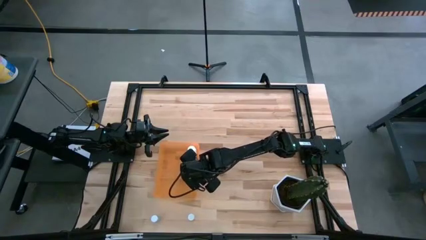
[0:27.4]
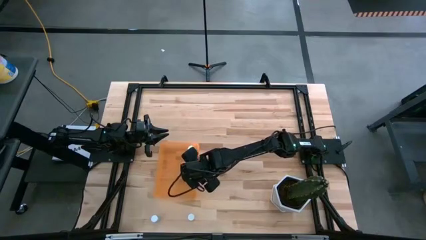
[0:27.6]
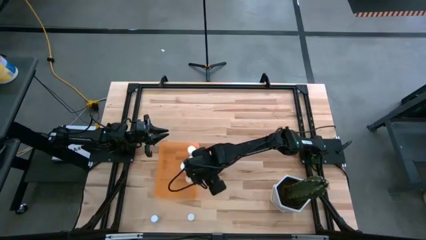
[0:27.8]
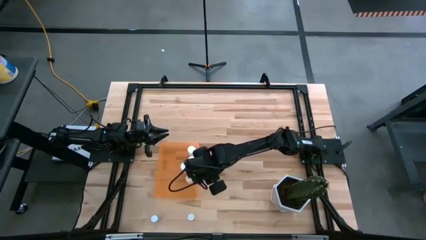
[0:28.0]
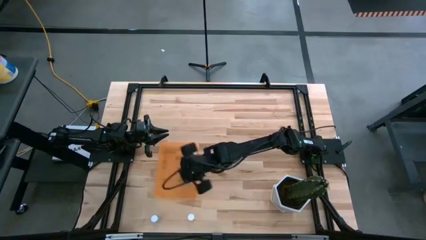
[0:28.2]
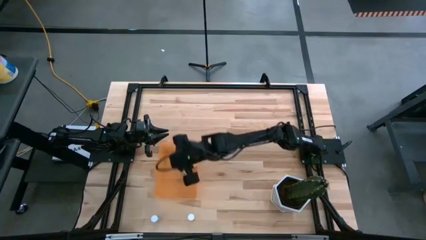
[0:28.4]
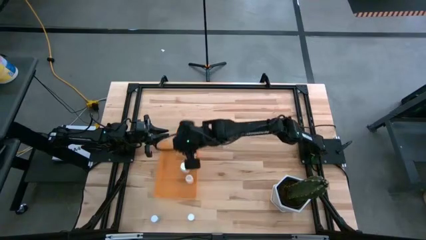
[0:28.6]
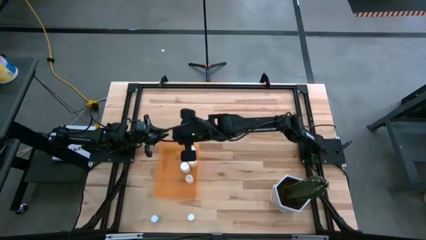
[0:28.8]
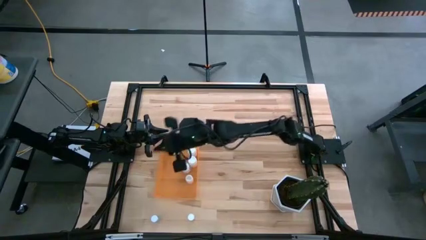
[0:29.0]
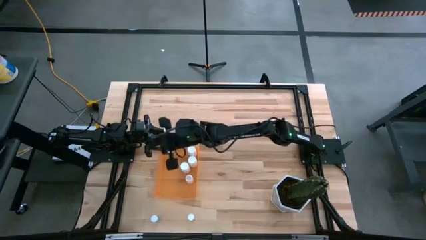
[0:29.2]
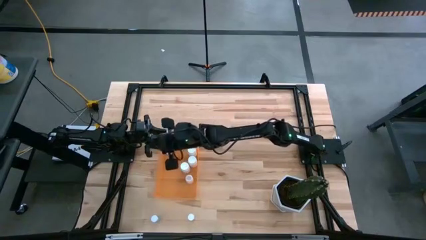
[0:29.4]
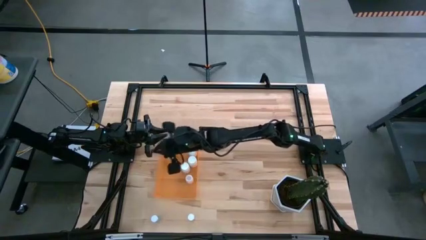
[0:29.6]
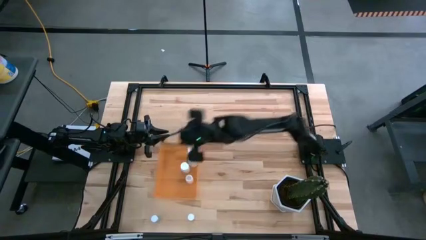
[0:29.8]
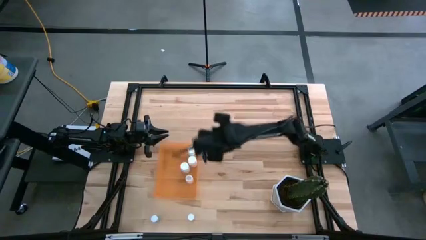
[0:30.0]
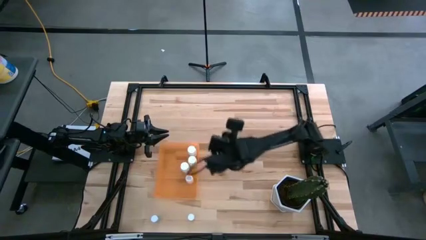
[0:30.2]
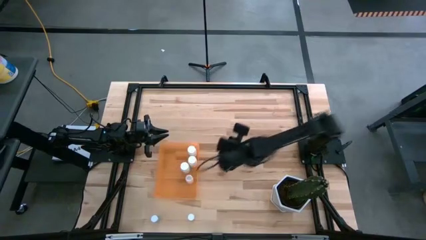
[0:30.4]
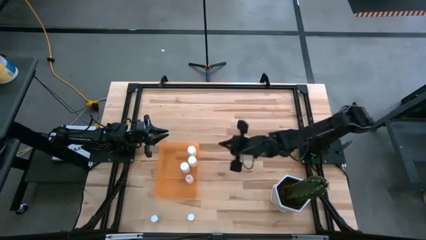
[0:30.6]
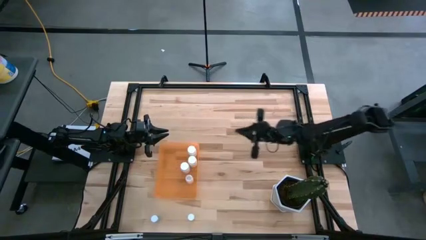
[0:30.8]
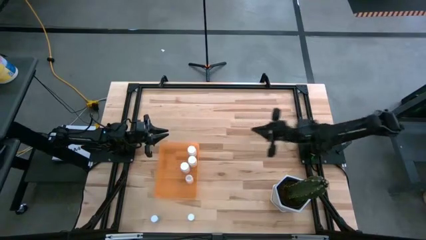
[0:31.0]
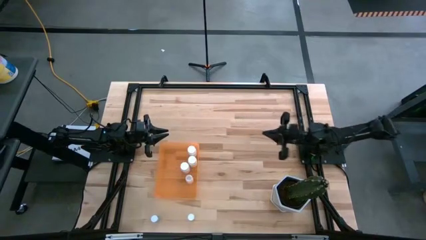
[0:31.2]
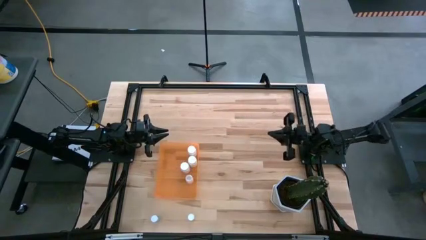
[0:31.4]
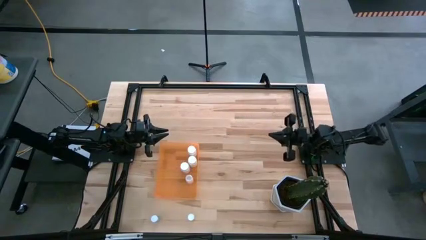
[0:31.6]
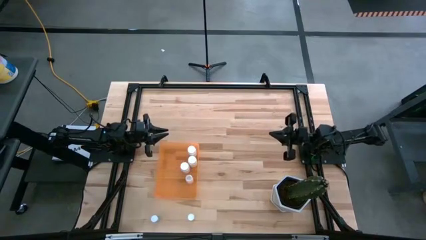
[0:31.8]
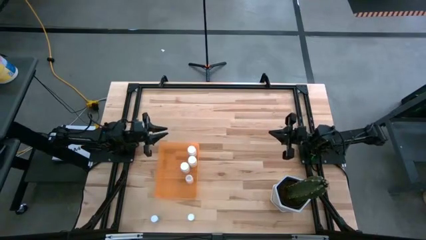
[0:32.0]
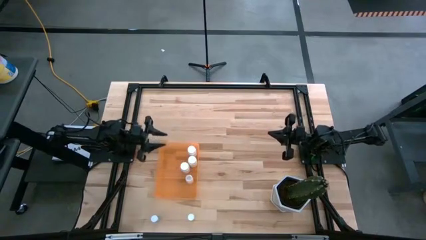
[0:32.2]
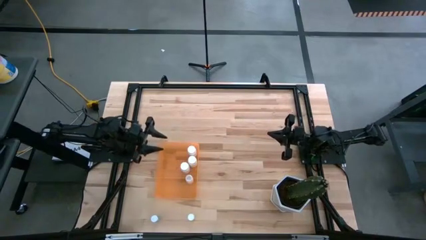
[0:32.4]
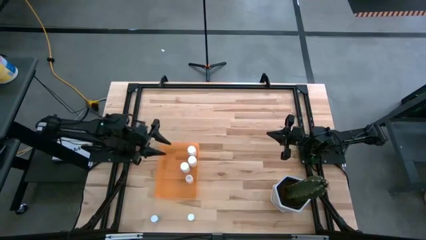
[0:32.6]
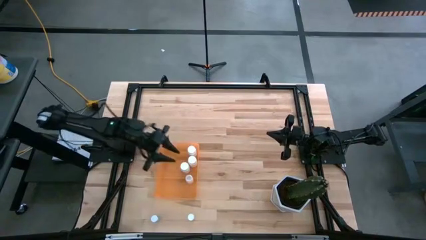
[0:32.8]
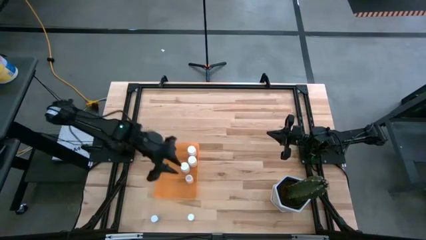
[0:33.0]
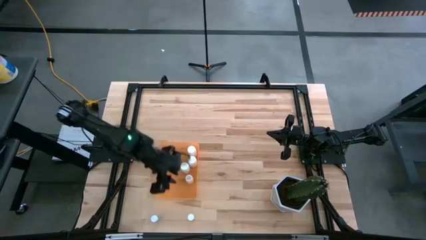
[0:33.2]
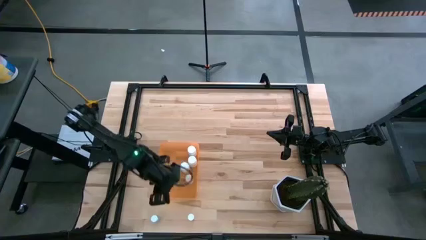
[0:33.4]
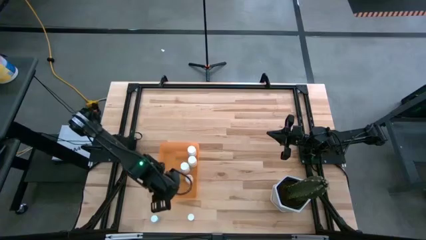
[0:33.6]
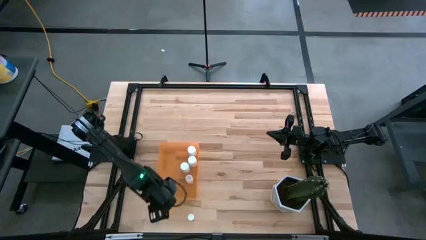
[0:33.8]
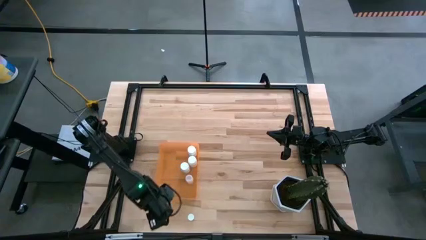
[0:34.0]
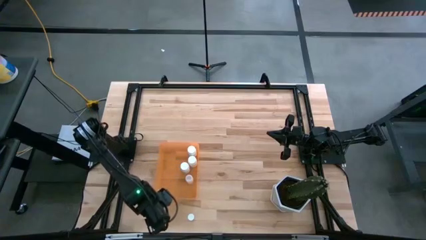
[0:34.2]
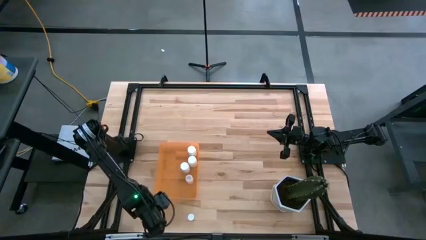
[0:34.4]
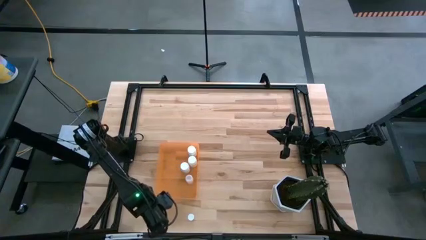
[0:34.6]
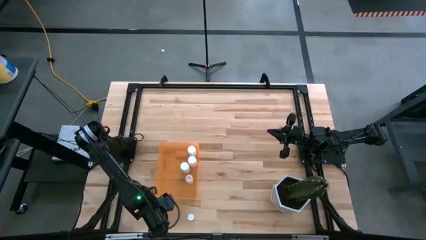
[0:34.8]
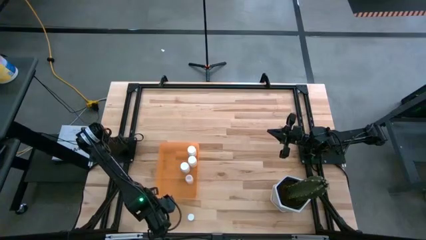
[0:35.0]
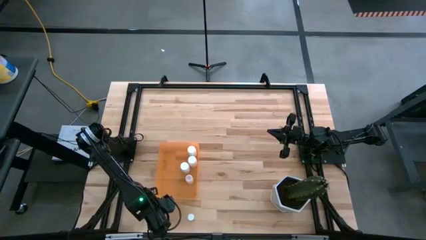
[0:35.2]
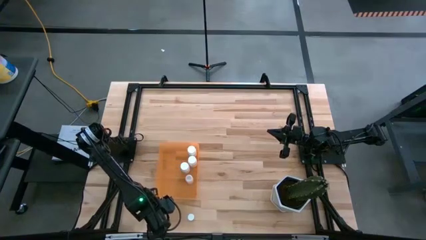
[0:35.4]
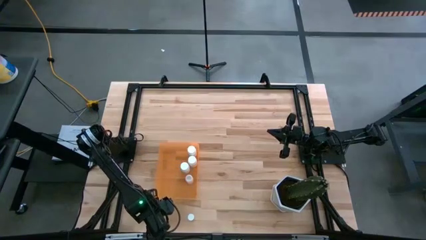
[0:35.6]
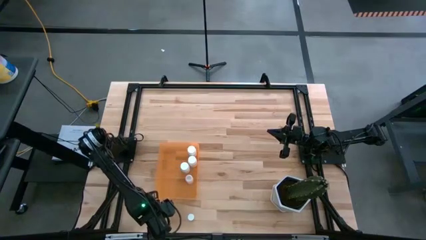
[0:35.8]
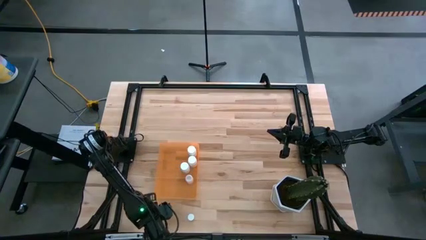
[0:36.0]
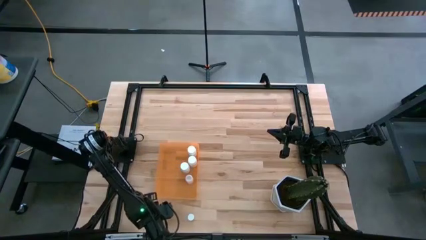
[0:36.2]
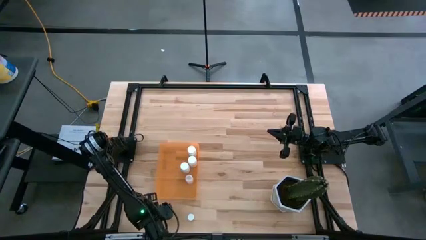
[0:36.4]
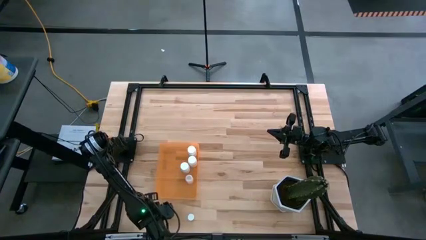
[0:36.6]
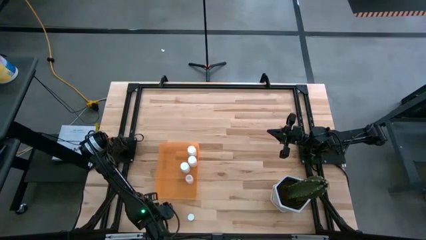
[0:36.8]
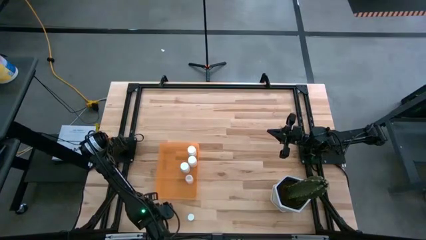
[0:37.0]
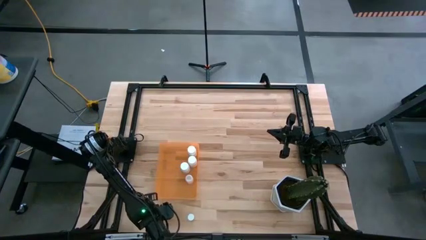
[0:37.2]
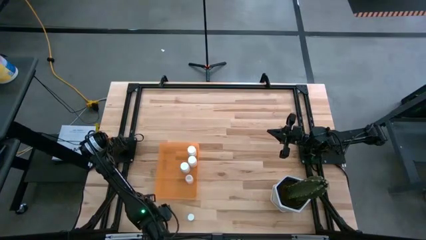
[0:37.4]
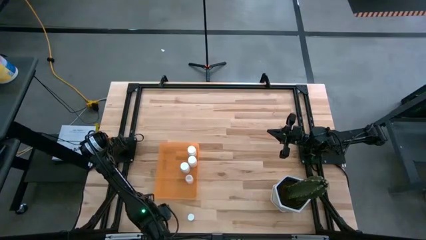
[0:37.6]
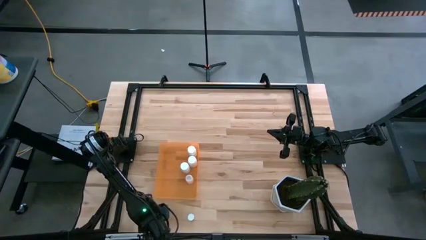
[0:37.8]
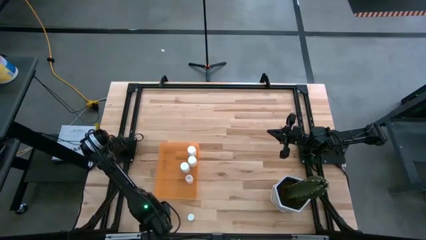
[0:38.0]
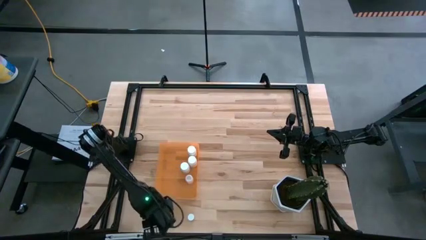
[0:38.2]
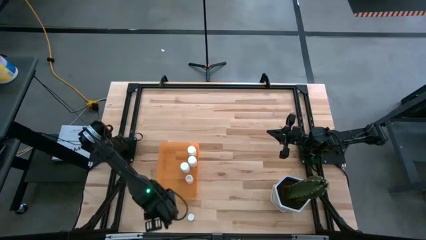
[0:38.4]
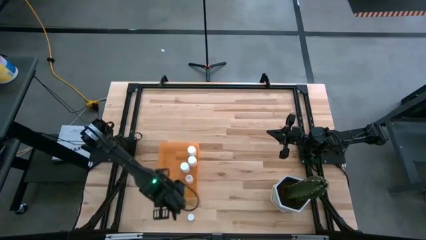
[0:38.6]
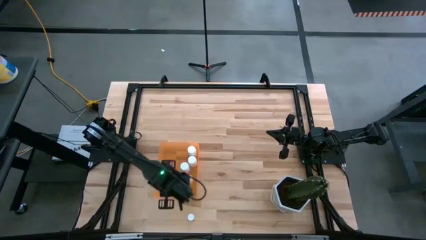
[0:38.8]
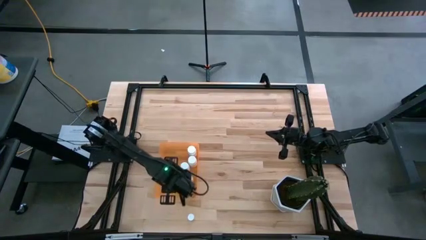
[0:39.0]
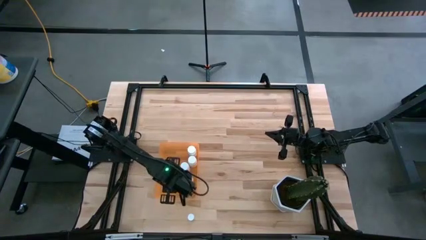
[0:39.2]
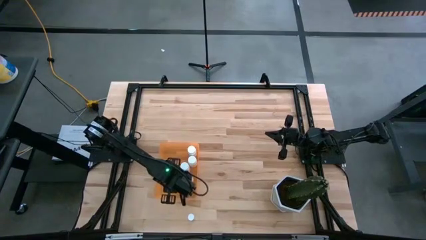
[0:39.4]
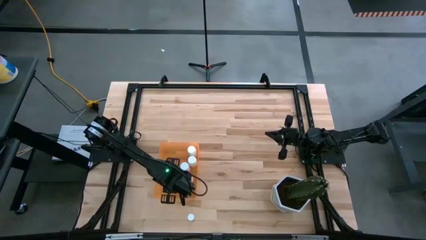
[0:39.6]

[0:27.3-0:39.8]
Task: Pick and place pill bottles into a basket
Put the blue pill bottle into the orange bin

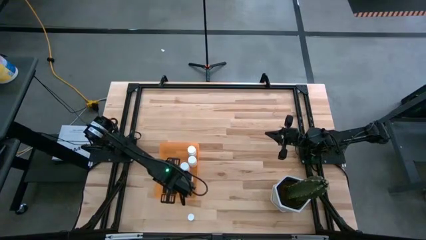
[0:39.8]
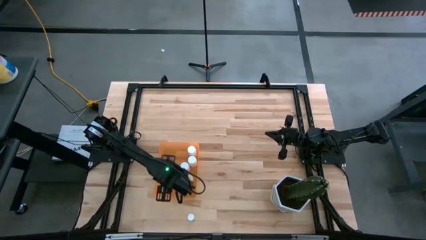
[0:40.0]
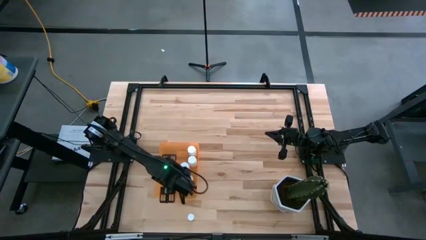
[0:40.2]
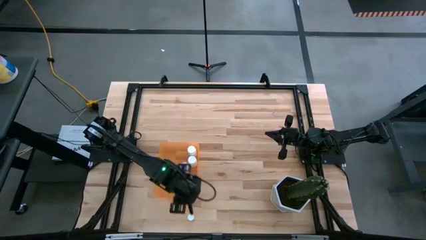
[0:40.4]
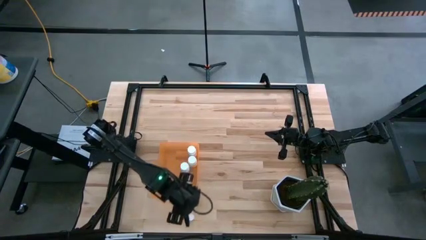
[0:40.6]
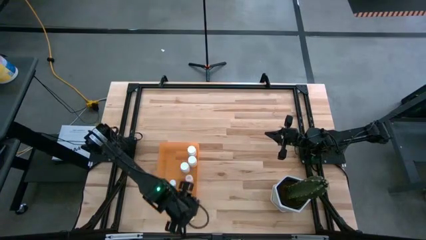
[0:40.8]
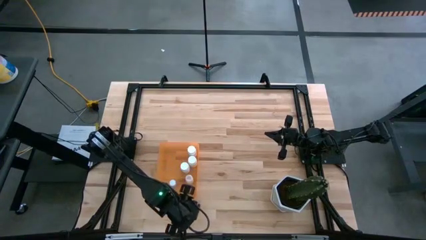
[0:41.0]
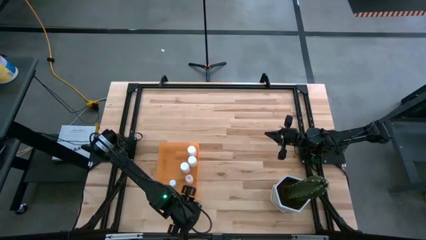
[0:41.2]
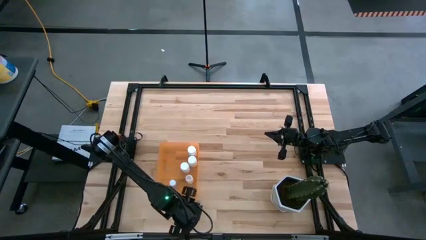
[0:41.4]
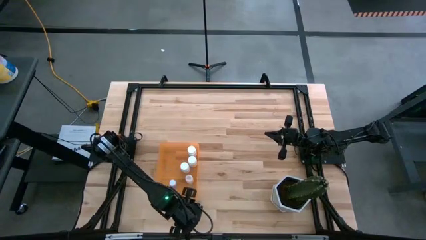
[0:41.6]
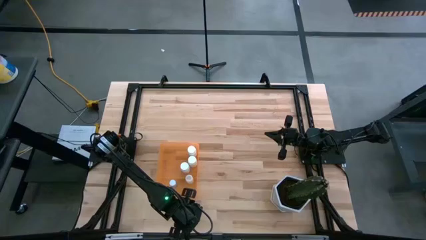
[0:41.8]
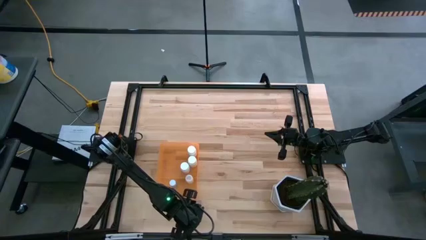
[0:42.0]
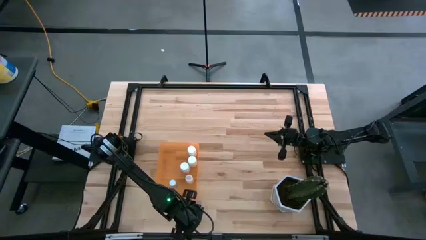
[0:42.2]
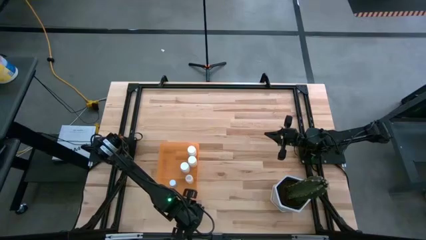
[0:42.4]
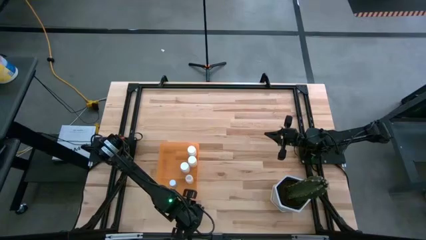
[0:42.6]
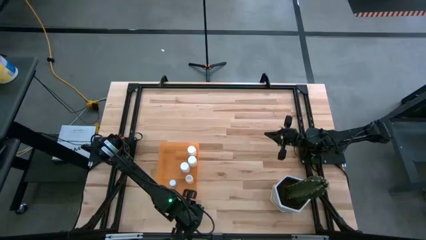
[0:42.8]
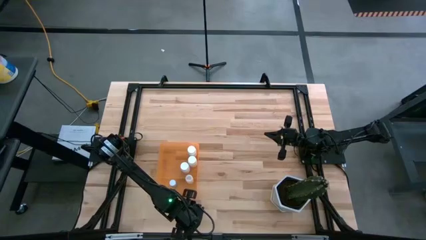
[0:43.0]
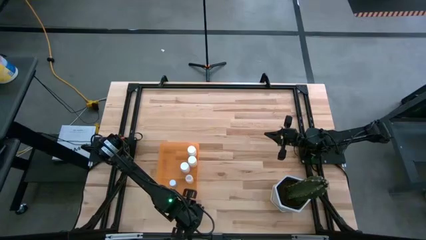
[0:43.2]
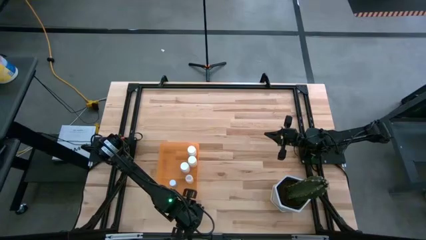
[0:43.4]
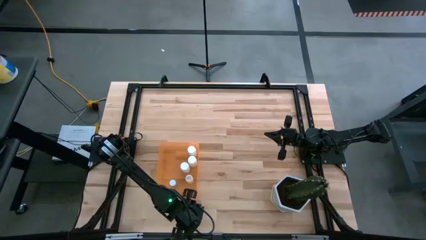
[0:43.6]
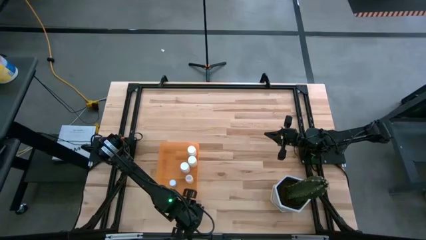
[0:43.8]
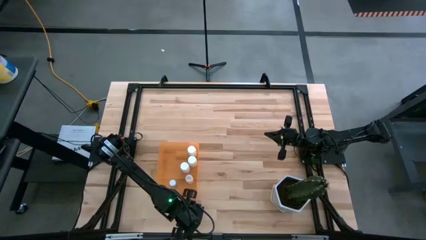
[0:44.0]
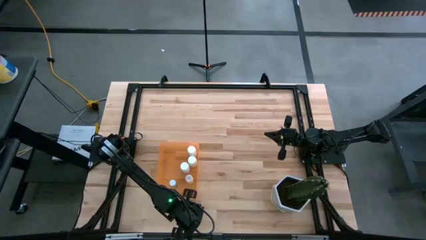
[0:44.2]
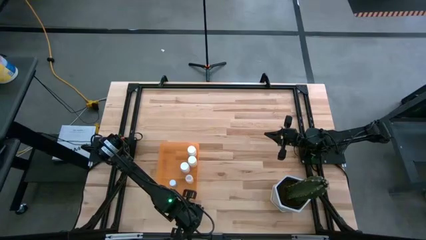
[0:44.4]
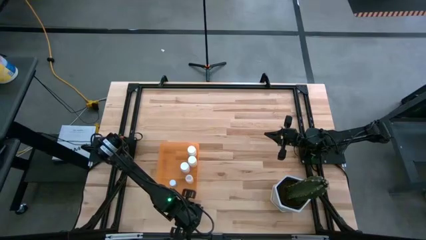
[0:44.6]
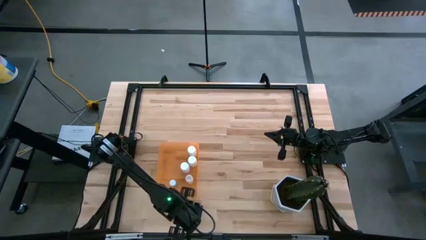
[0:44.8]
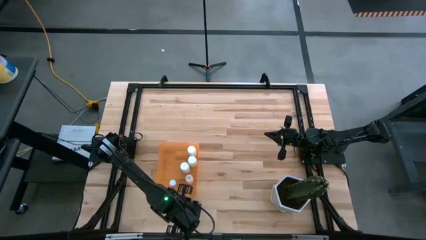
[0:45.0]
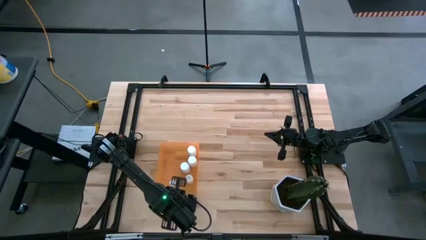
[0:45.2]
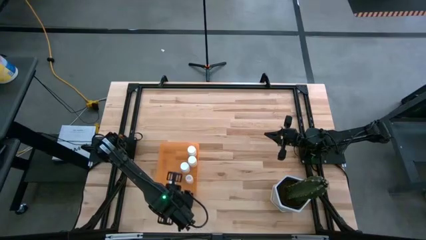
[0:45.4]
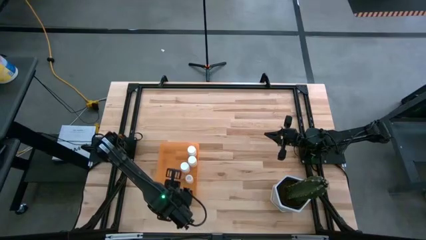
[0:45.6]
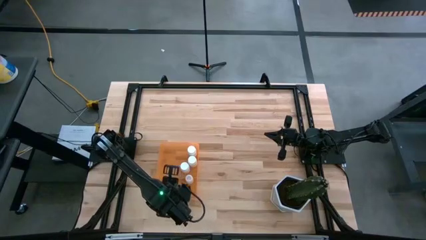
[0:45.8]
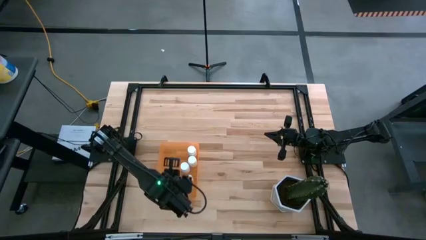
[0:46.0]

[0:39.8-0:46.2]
Put the yellow pill bottle into the orange bin
